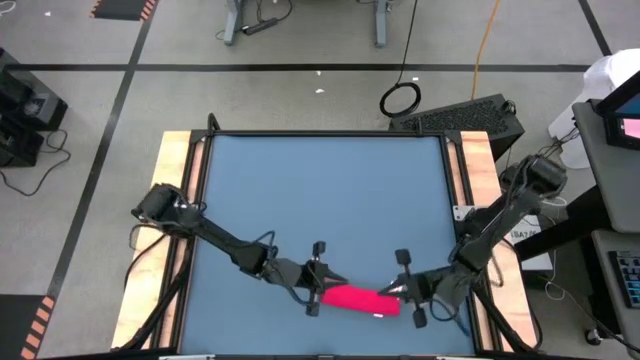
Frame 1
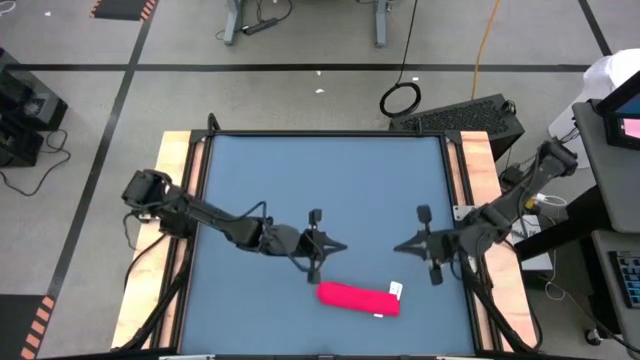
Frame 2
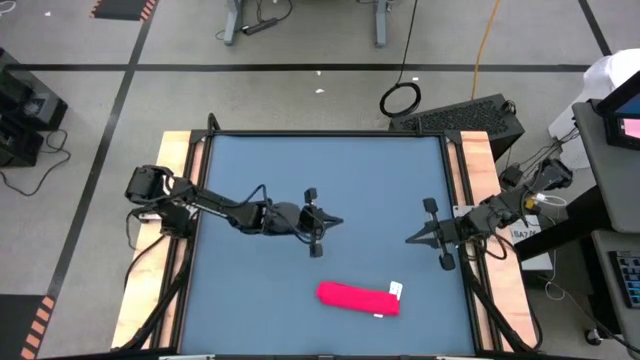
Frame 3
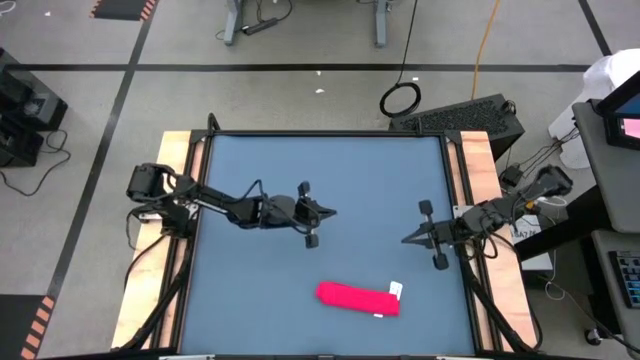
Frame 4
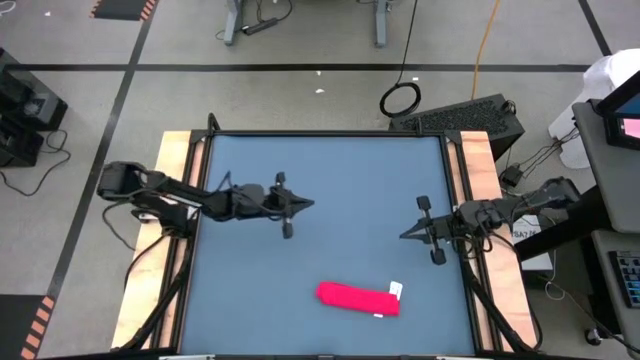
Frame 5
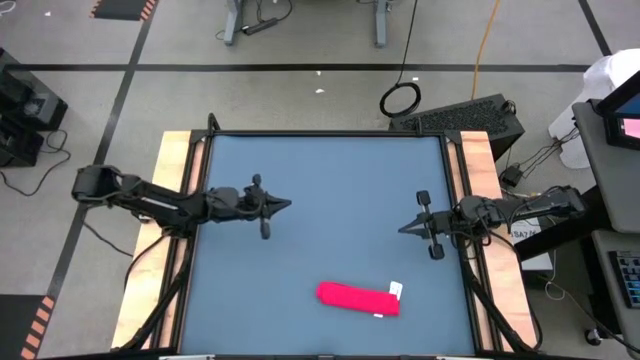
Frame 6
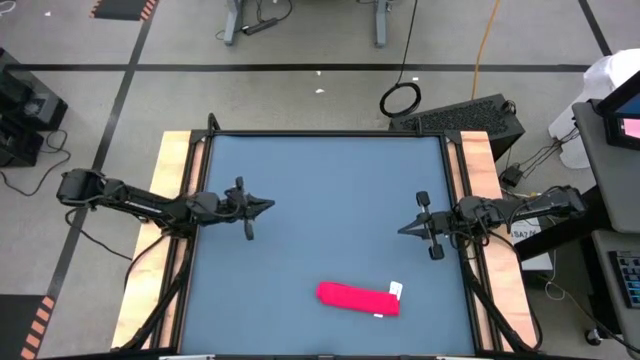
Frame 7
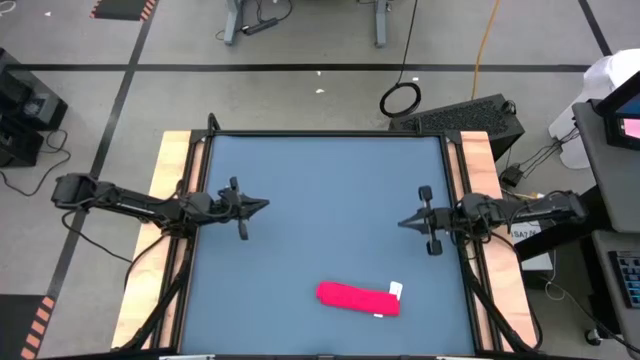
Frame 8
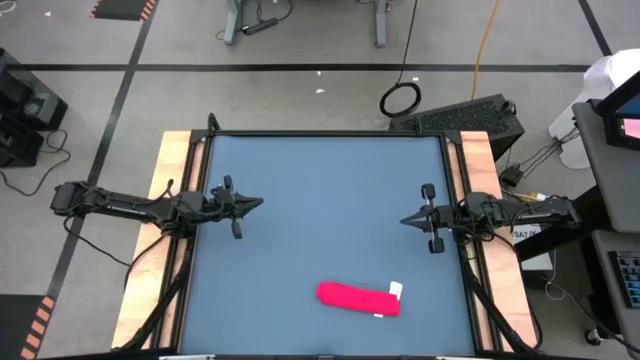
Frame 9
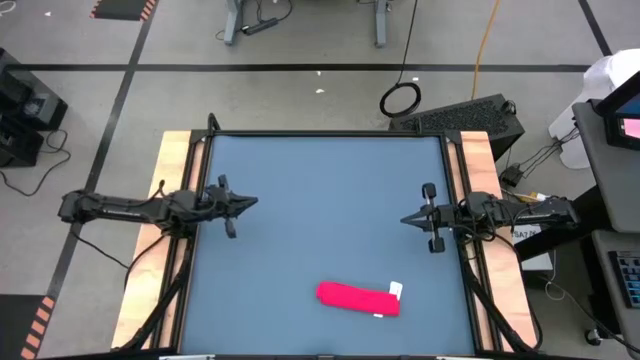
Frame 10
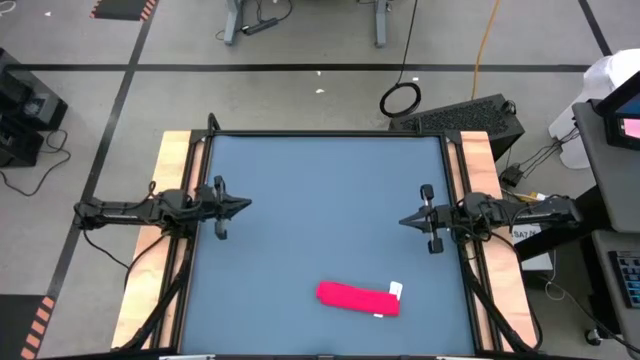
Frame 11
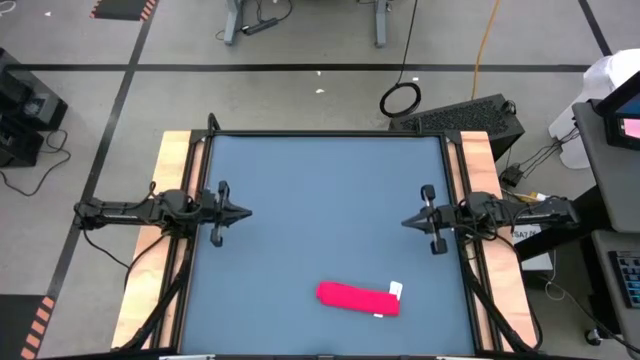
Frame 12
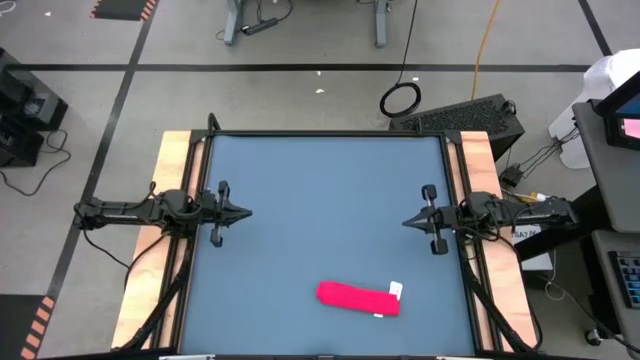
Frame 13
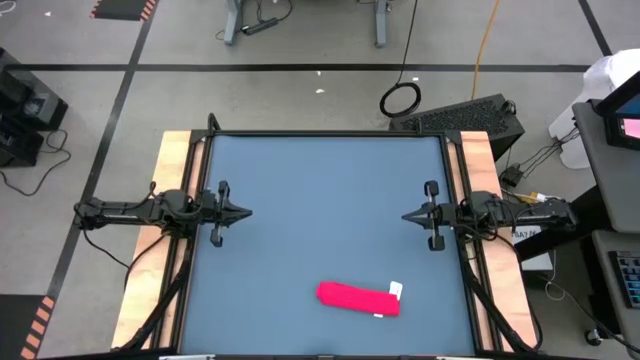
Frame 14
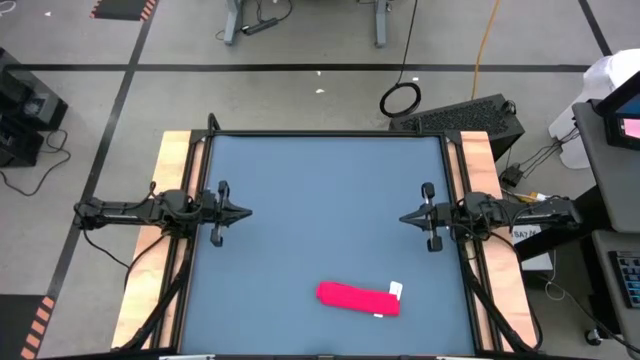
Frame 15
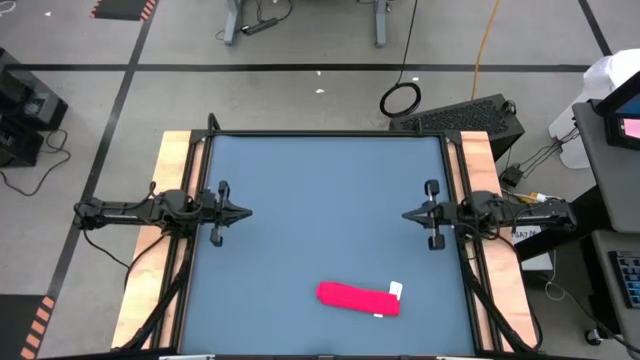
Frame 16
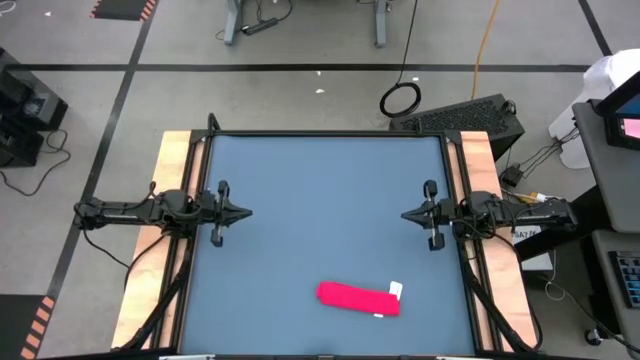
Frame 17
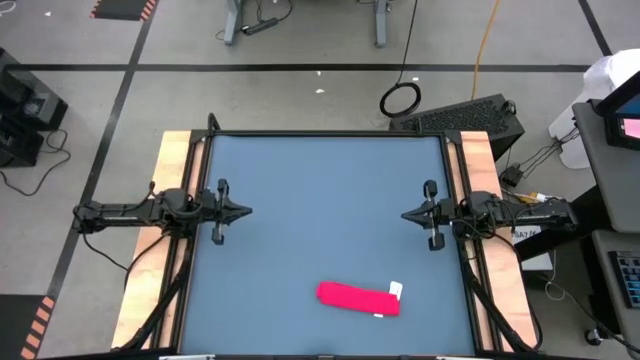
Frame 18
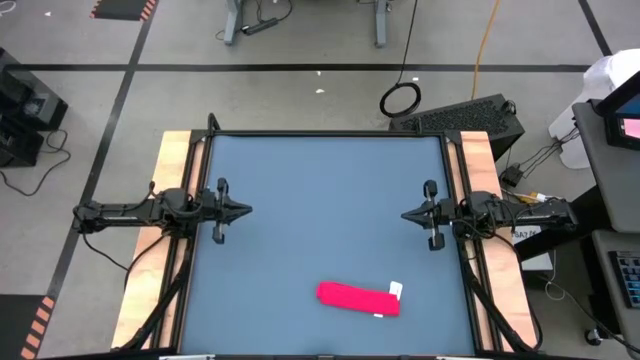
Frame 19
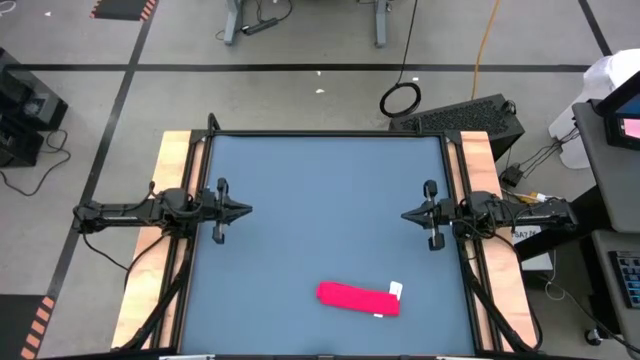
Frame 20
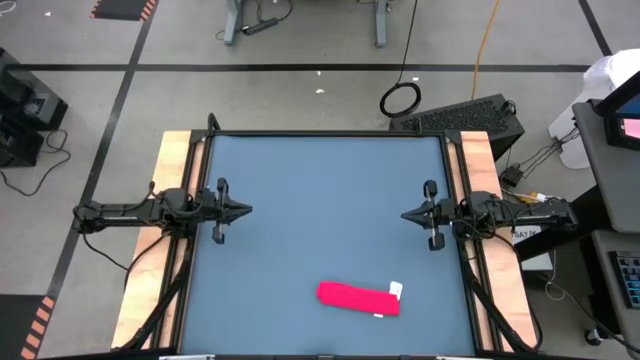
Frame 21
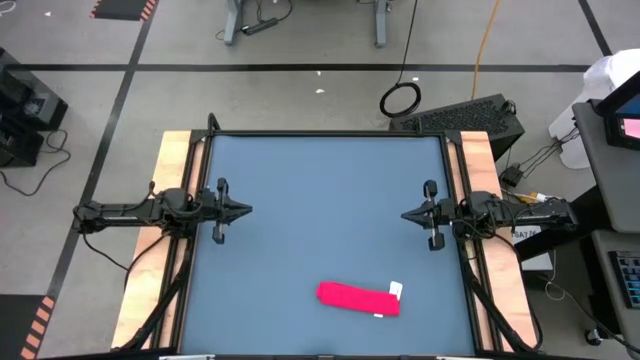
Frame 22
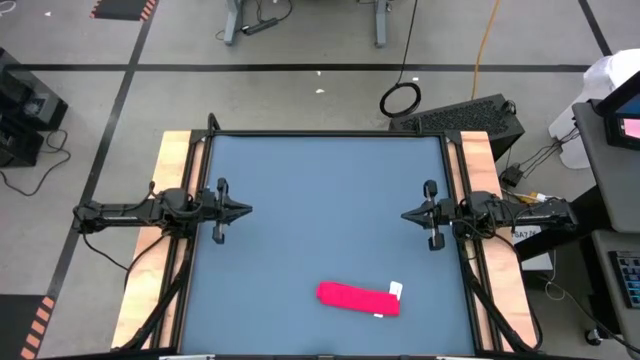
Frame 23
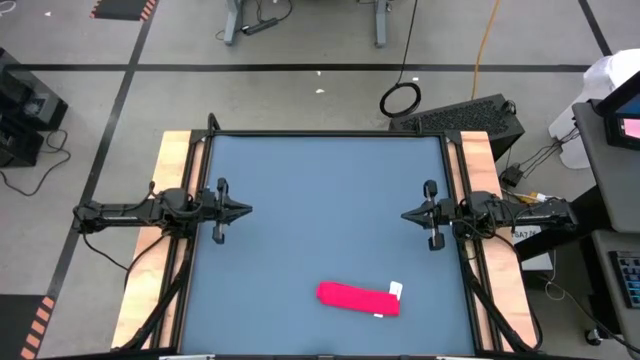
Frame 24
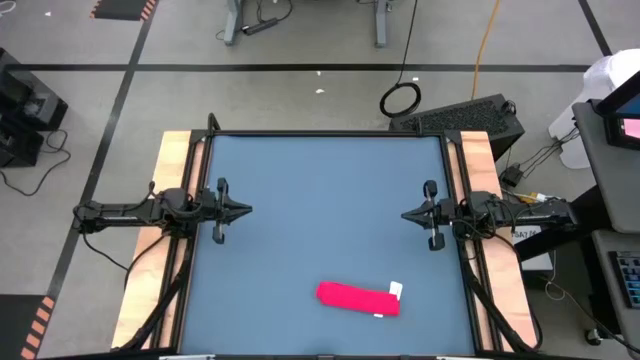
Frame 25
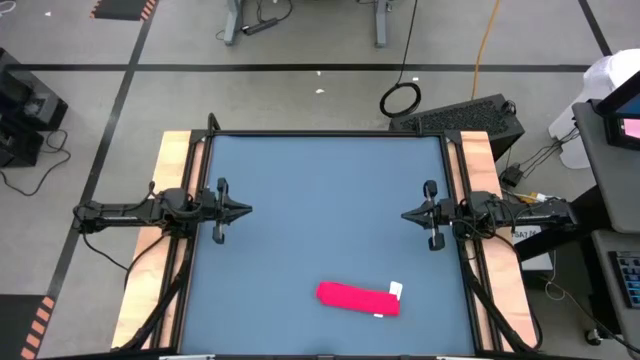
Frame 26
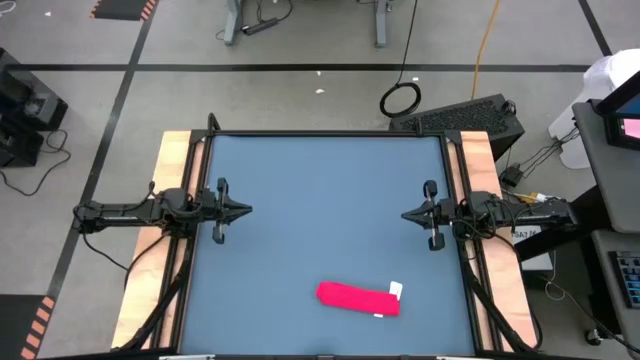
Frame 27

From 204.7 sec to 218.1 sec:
Task: Roll towel
Return to Home Position

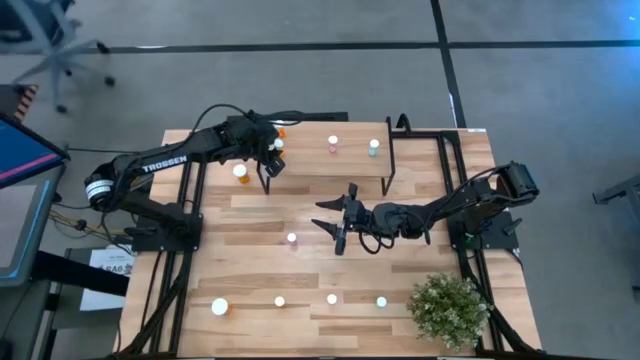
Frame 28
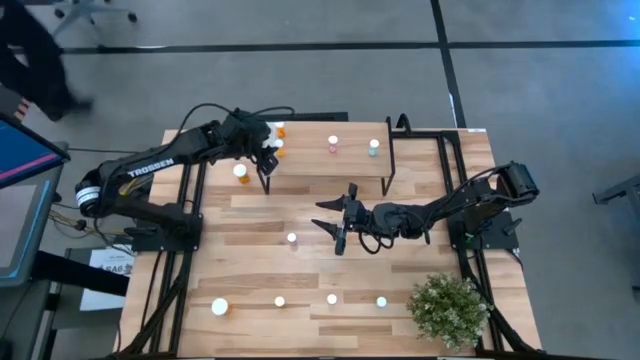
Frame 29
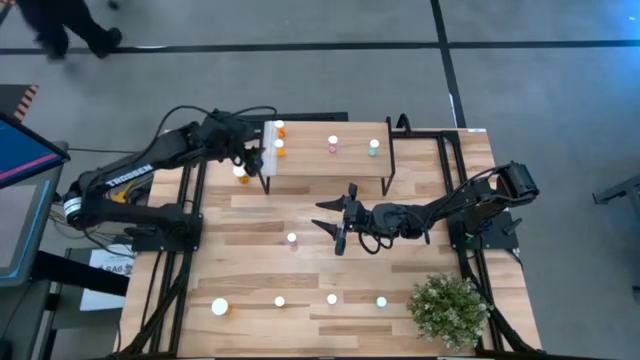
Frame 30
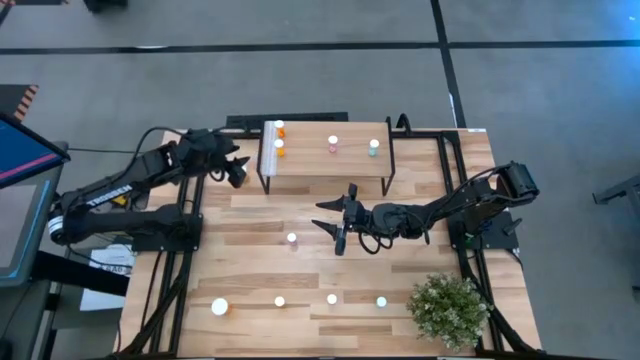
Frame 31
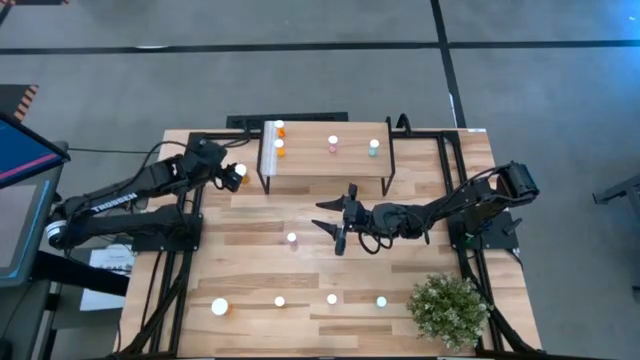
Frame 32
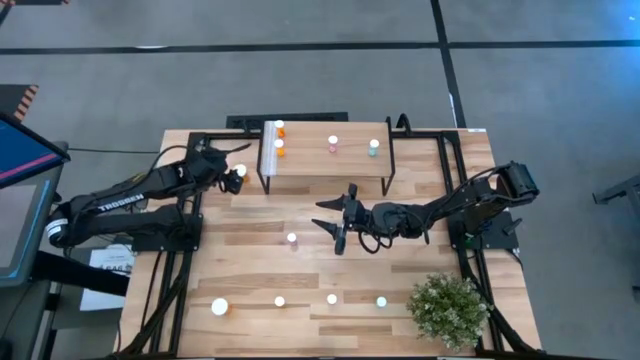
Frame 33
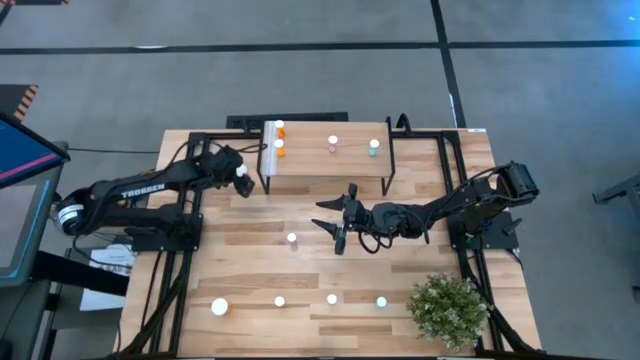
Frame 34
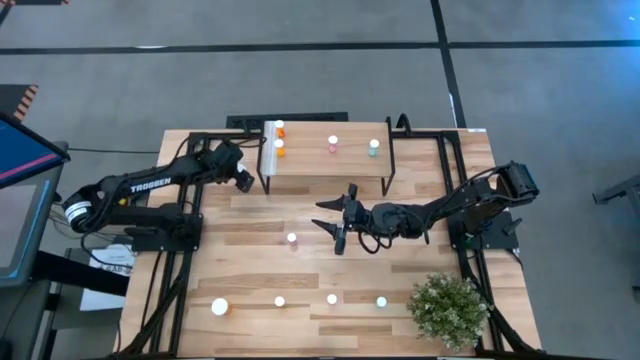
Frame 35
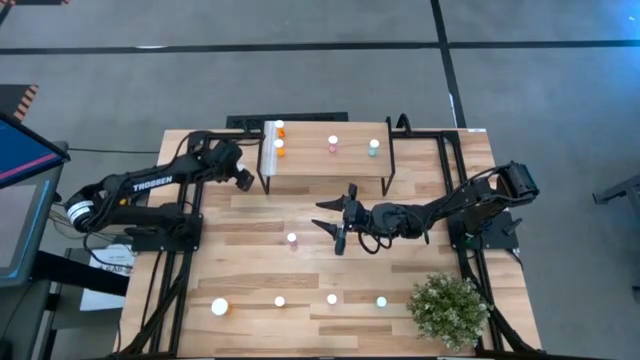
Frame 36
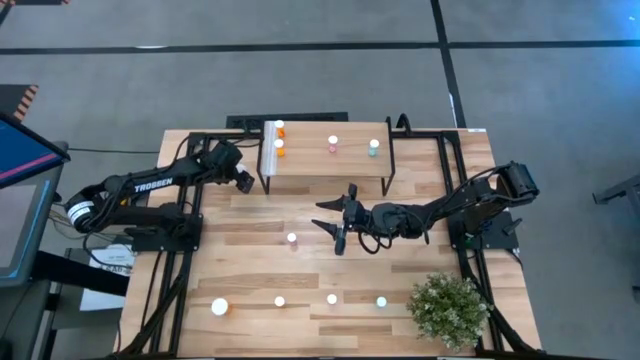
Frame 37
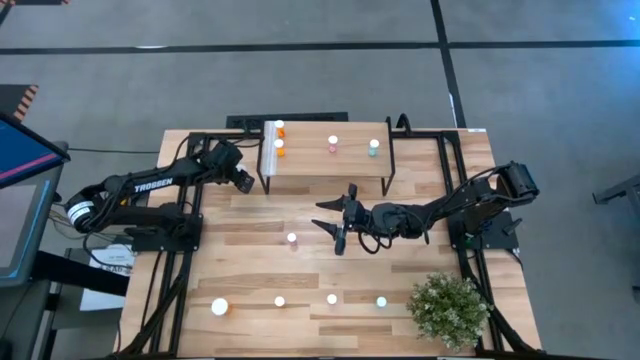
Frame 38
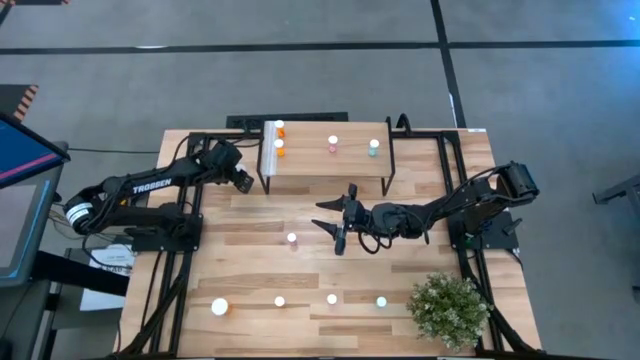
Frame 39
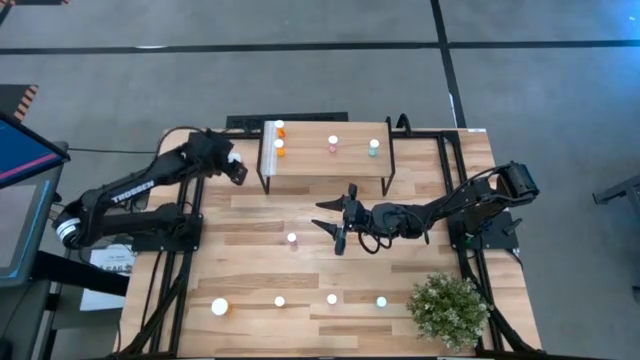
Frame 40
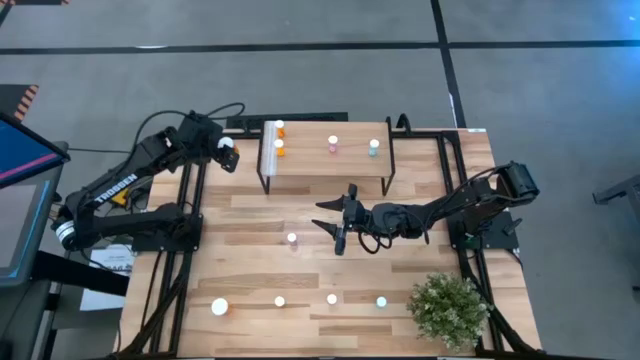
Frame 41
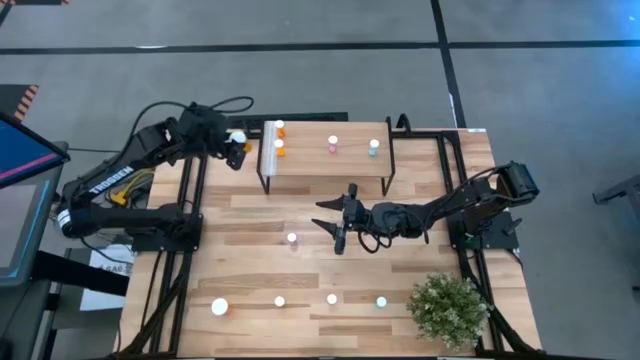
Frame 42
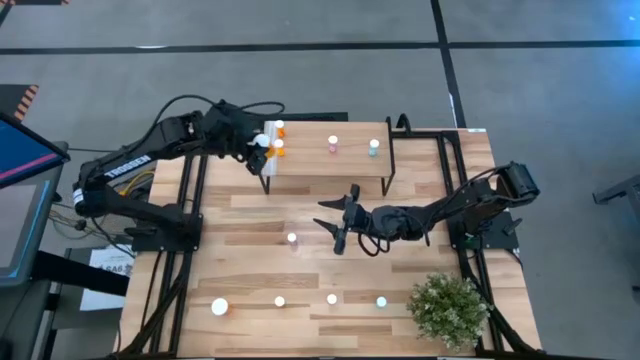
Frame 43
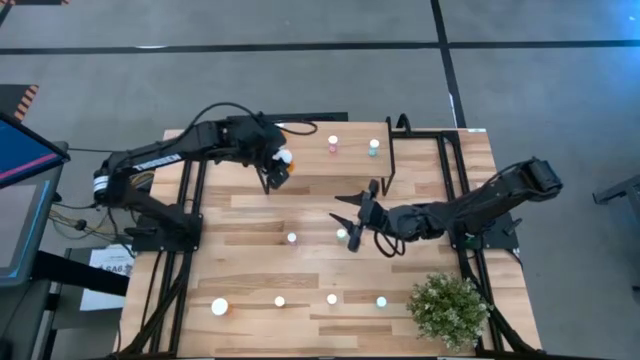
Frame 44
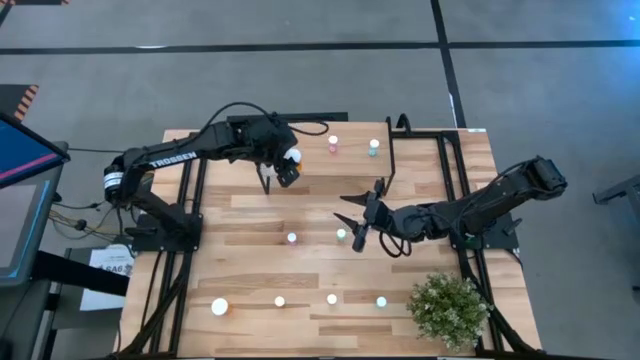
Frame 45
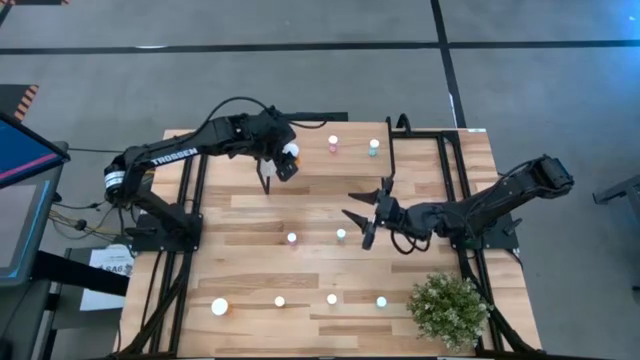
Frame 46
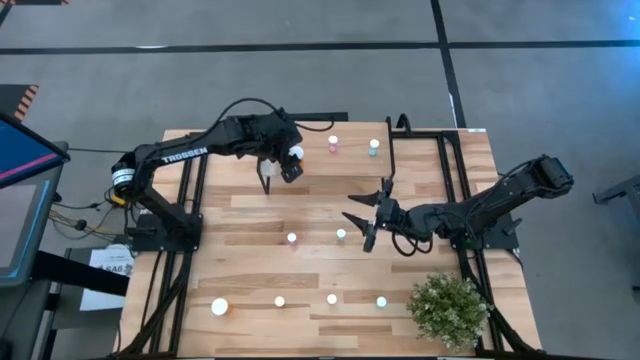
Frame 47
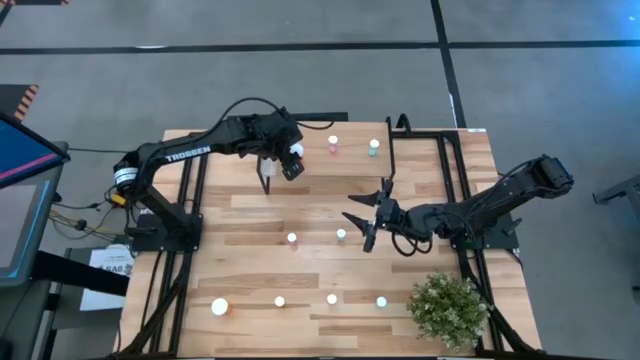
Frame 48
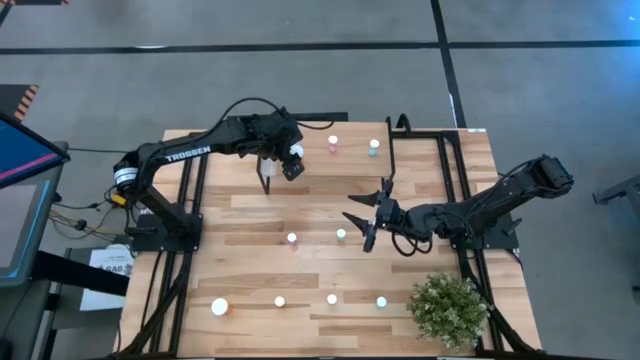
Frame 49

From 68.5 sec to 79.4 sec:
Task: Pick and place medicine bottles onto shelf by color
Put the top large orange pill bottle on the shelf
